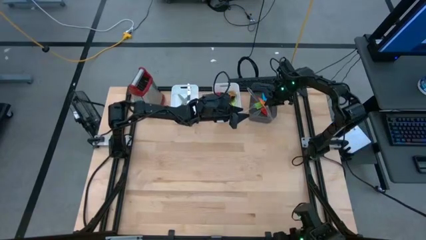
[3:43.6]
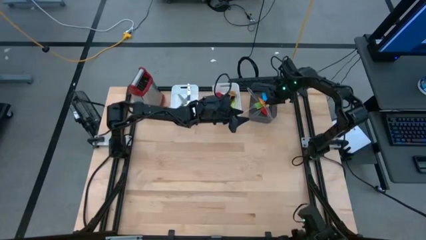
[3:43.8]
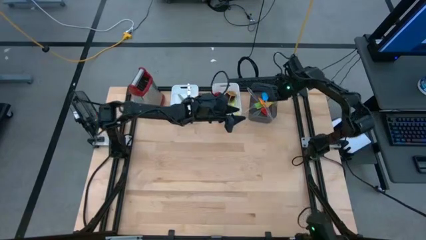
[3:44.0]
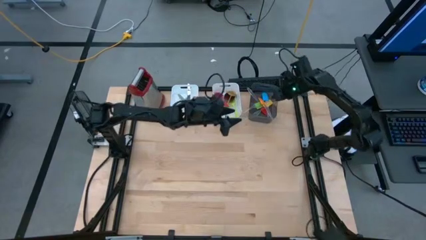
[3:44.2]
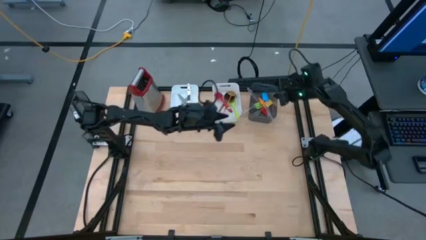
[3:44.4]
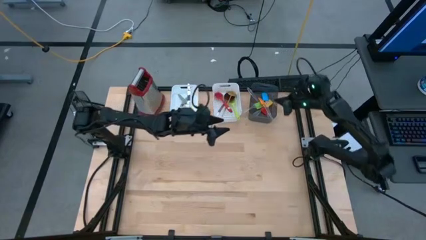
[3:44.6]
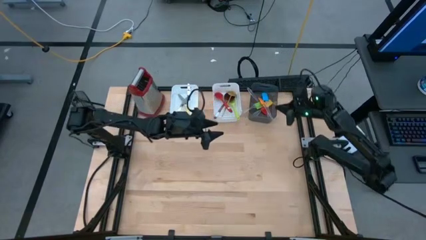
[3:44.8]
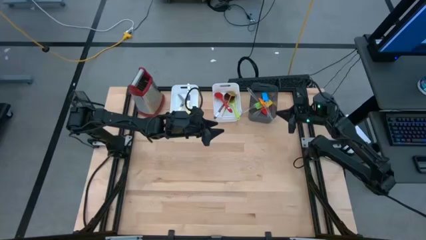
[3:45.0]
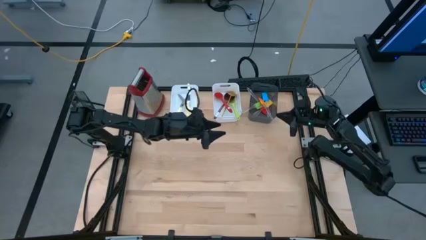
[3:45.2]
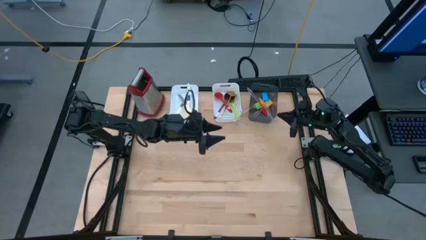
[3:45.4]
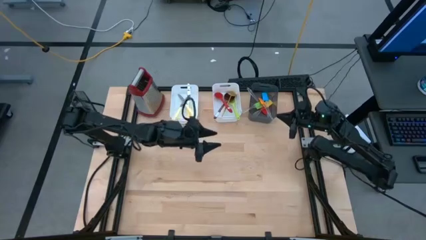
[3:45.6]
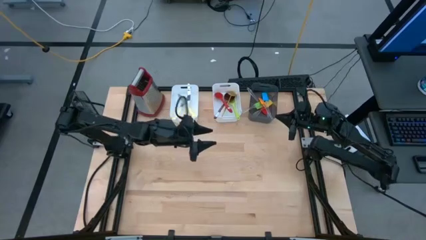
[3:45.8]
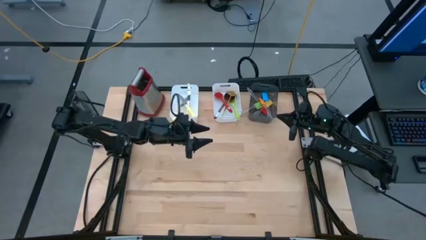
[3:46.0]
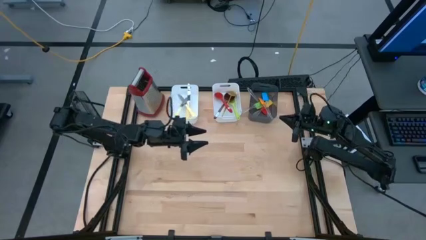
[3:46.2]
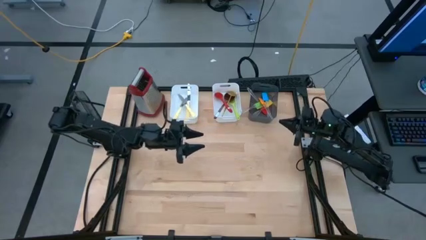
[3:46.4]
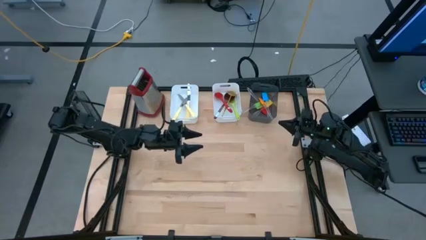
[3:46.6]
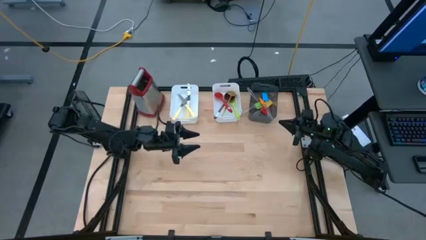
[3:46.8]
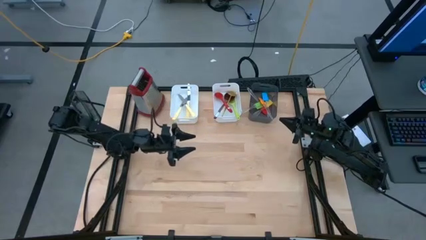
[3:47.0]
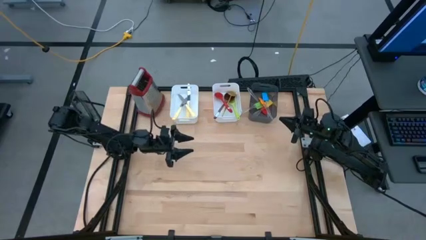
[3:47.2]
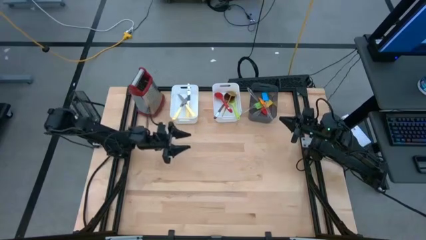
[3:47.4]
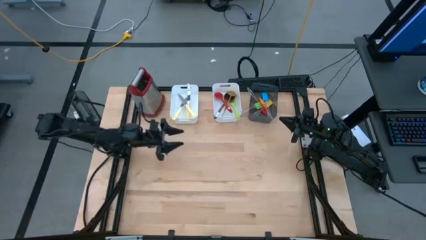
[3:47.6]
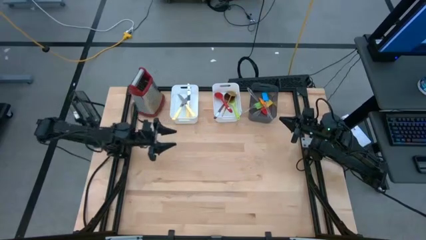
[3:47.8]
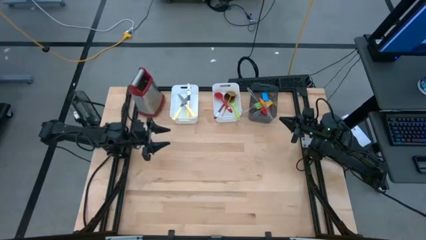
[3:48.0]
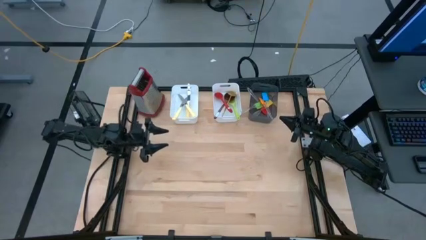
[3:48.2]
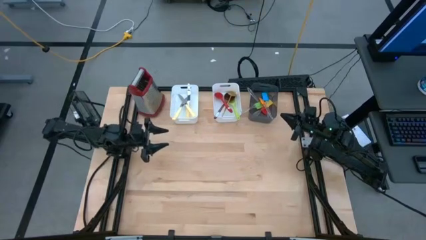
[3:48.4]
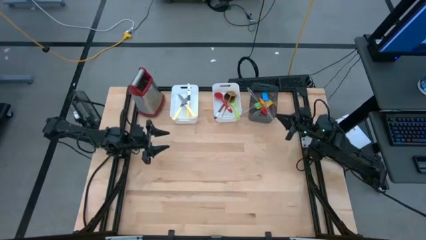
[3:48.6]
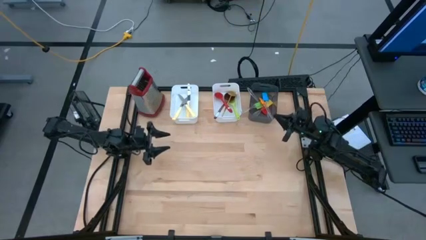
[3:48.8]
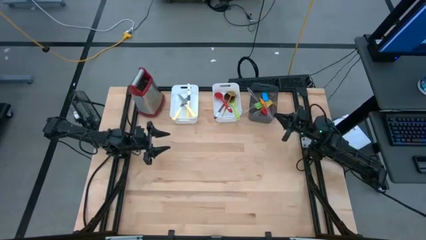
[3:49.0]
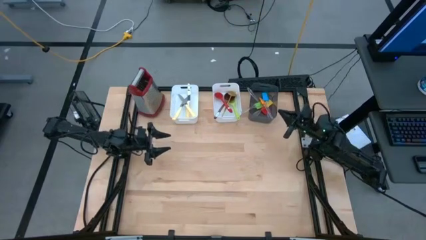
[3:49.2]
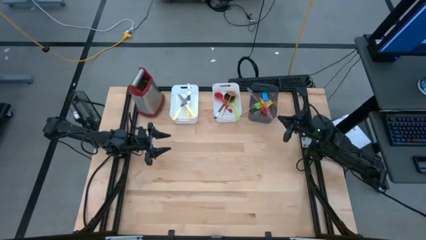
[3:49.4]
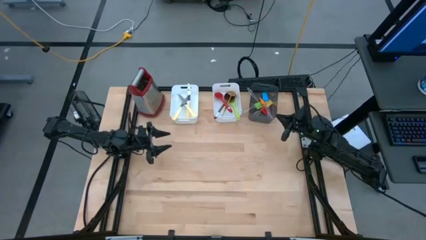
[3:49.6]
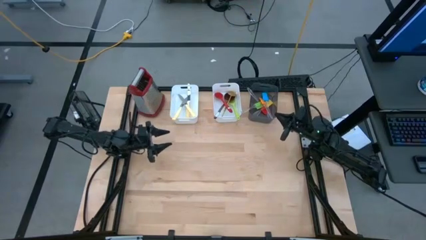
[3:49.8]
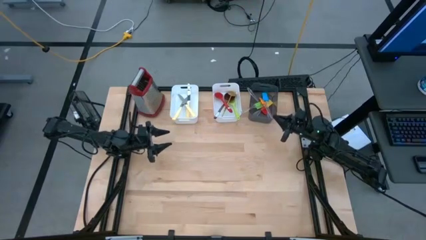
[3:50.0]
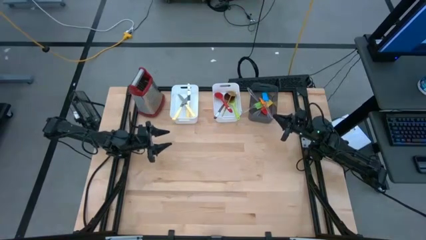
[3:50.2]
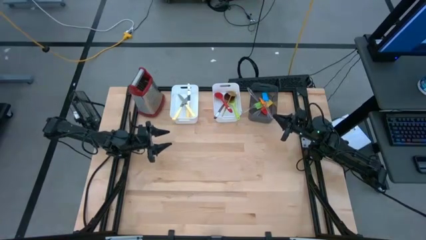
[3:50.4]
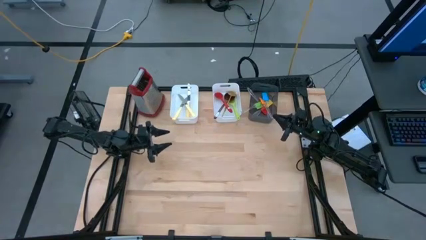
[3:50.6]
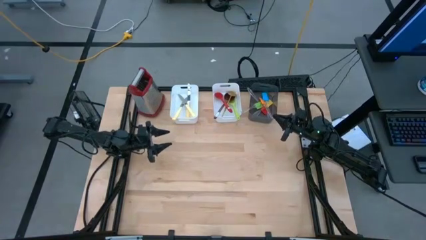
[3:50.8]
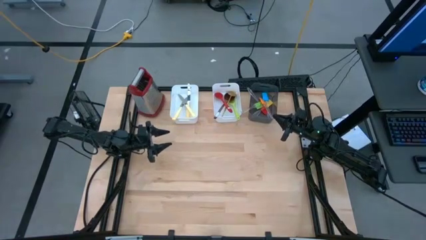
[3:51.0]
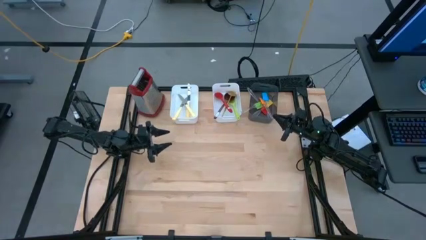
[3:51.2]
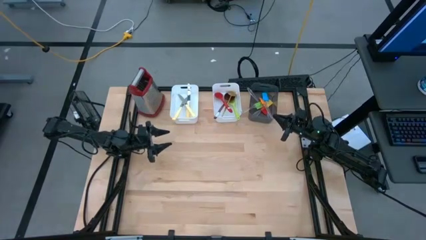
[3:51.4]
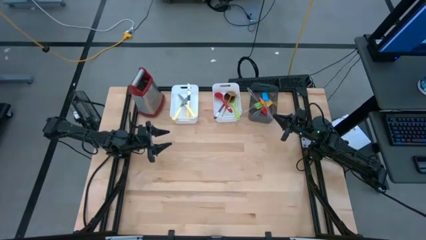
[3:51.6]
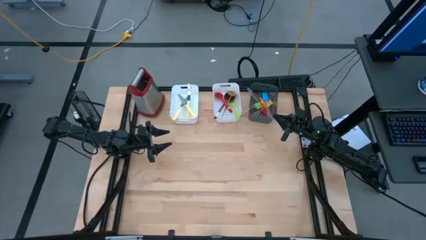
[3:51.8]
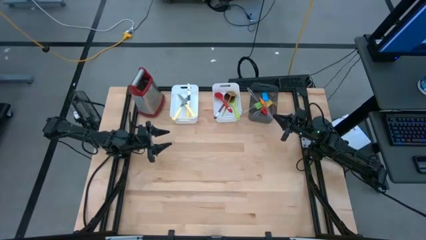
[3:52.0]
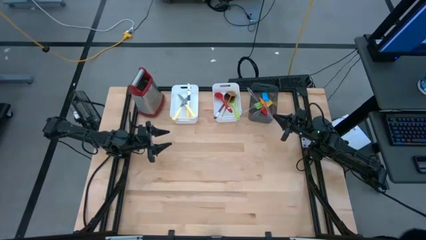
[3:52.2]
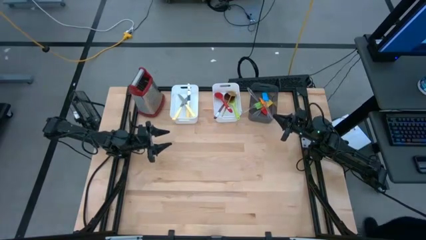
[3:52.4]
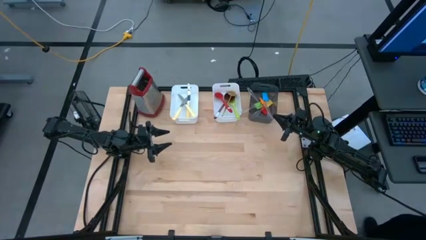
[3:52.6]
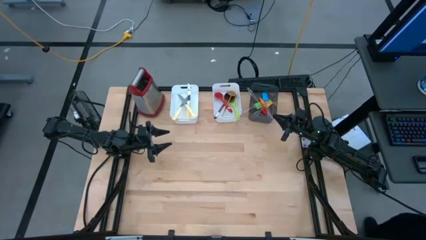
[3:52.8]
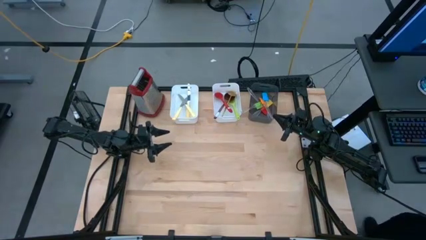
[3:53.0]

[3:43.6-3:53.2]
Task: Pick & Place Kitchen Items
Return to Home Position

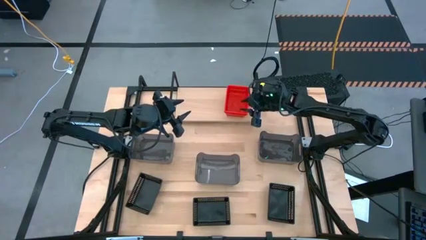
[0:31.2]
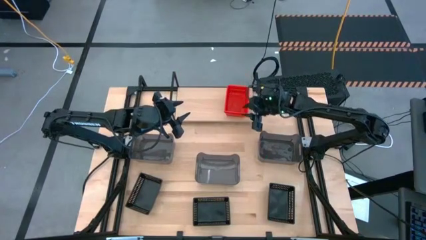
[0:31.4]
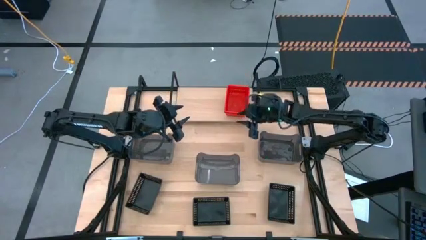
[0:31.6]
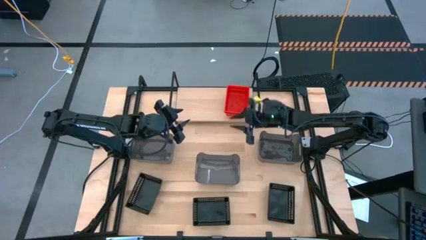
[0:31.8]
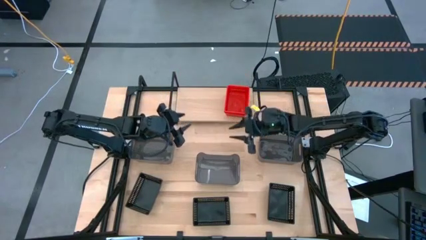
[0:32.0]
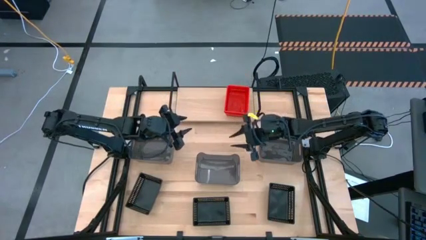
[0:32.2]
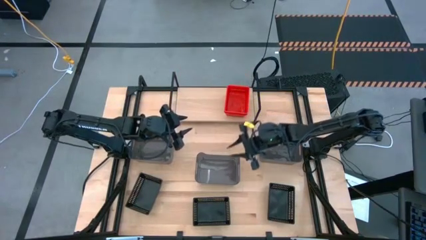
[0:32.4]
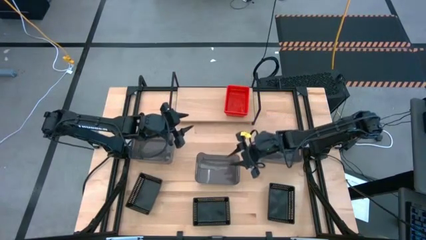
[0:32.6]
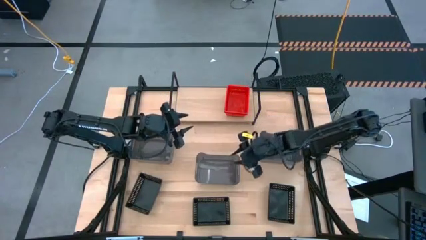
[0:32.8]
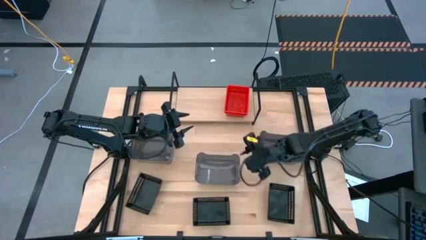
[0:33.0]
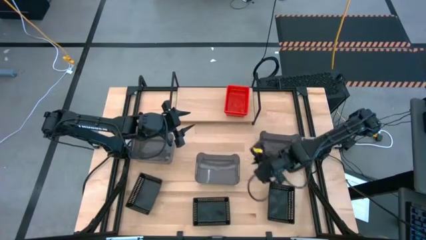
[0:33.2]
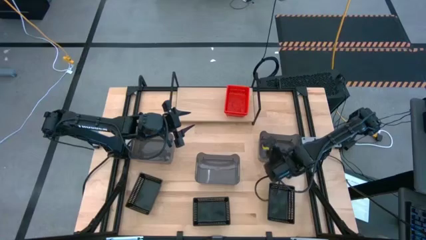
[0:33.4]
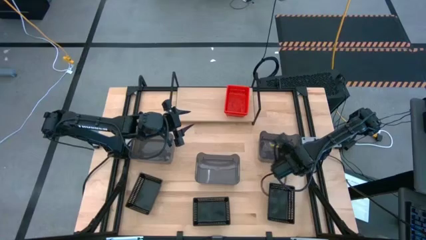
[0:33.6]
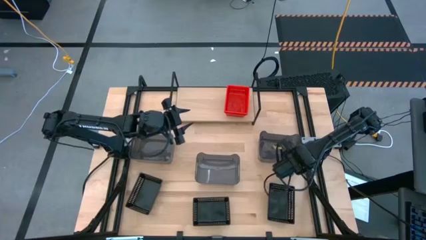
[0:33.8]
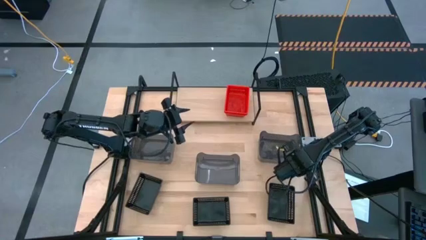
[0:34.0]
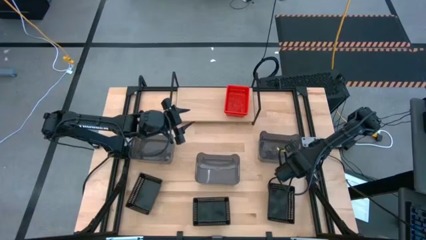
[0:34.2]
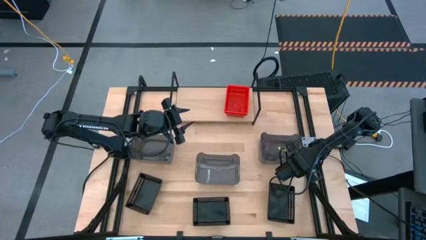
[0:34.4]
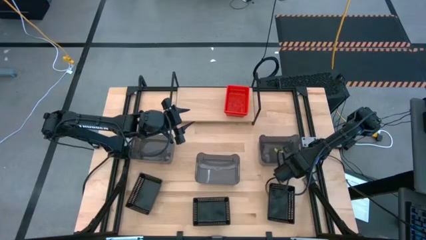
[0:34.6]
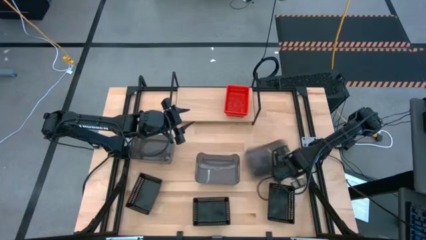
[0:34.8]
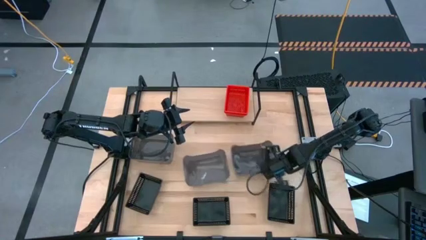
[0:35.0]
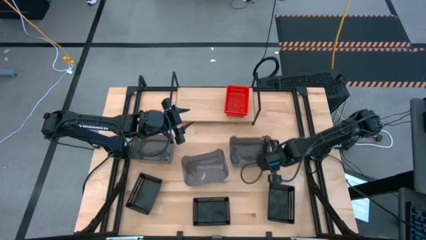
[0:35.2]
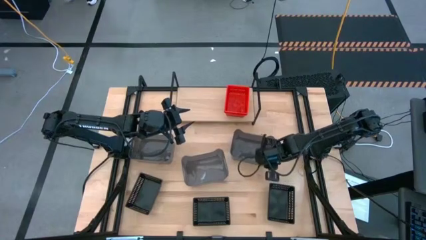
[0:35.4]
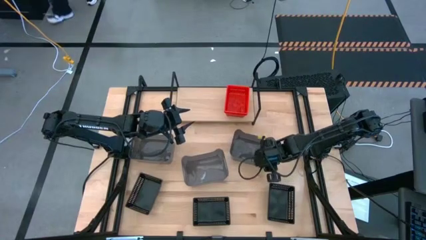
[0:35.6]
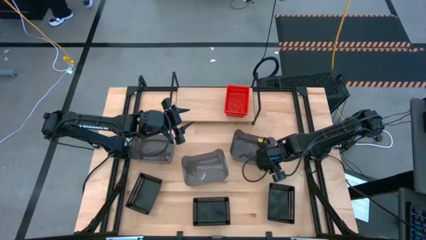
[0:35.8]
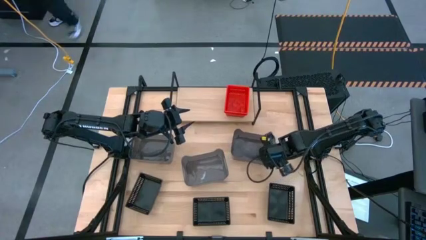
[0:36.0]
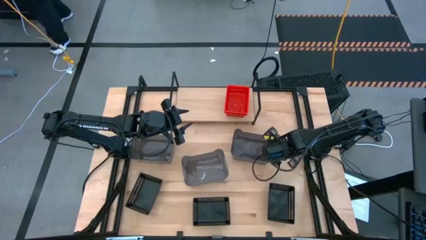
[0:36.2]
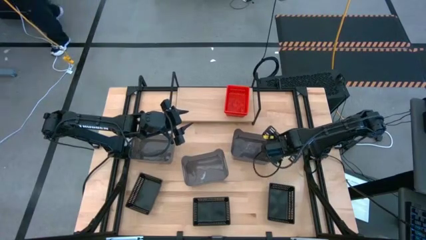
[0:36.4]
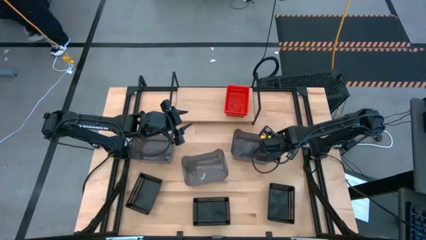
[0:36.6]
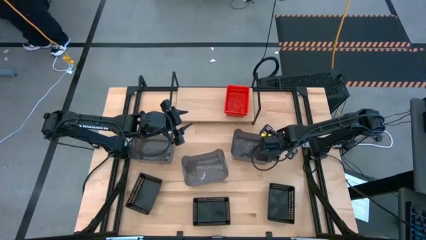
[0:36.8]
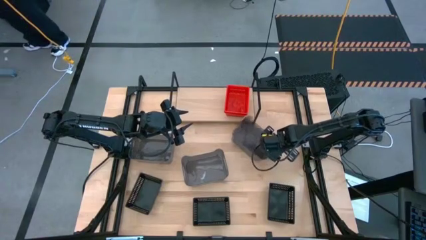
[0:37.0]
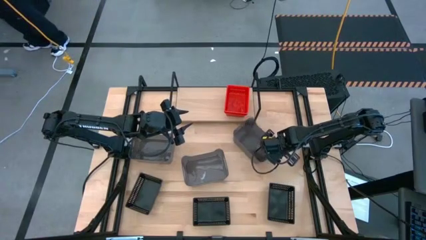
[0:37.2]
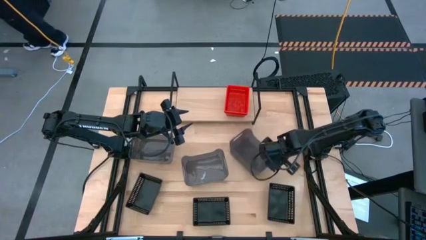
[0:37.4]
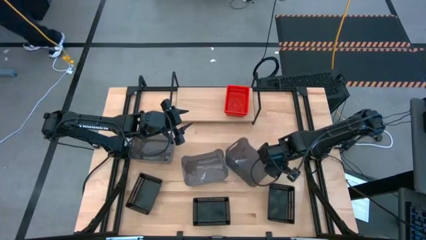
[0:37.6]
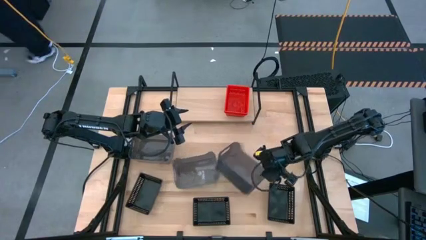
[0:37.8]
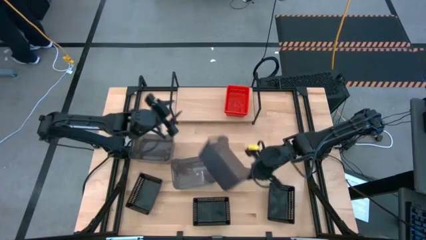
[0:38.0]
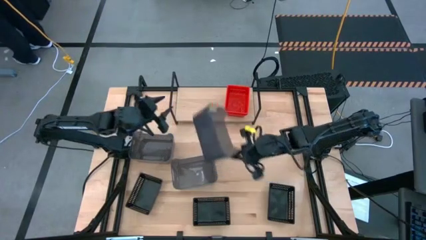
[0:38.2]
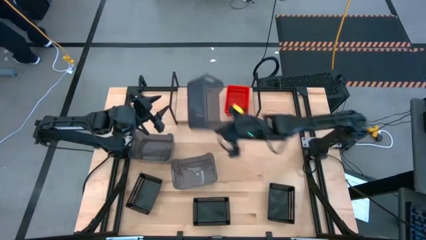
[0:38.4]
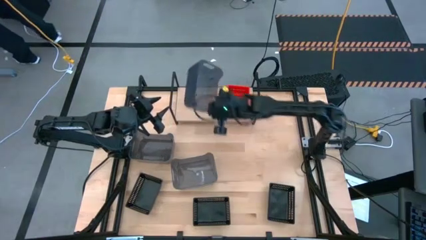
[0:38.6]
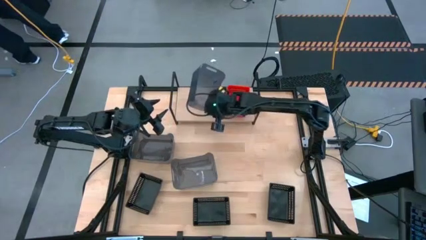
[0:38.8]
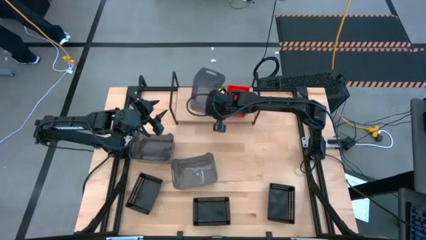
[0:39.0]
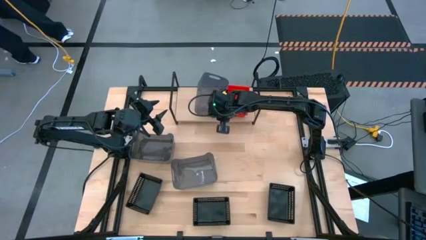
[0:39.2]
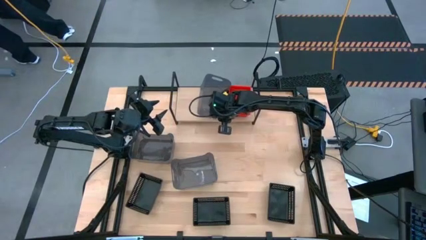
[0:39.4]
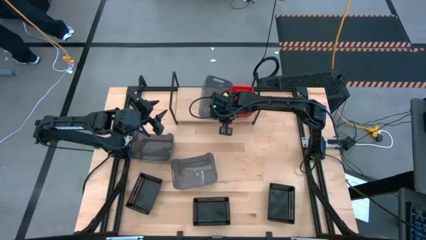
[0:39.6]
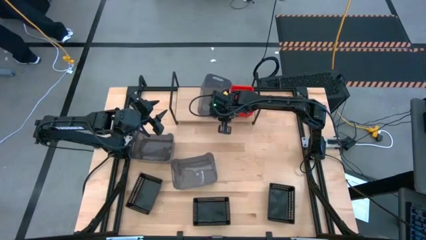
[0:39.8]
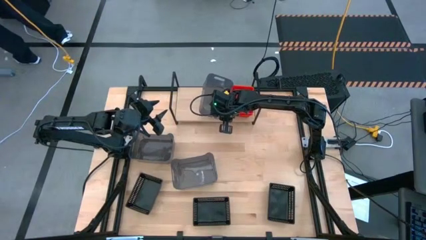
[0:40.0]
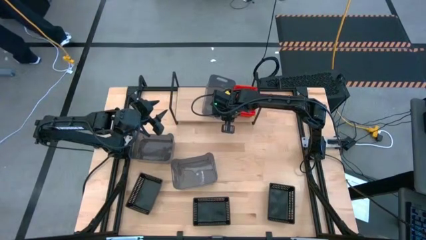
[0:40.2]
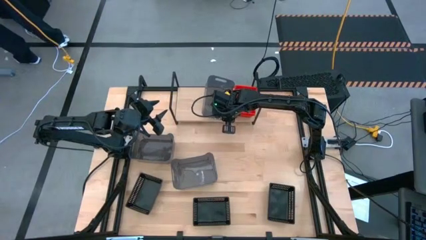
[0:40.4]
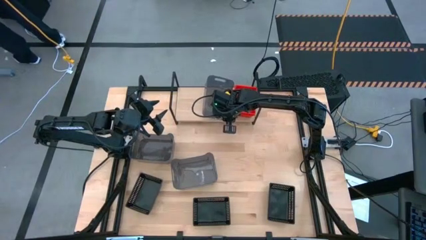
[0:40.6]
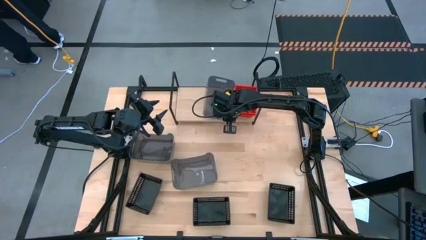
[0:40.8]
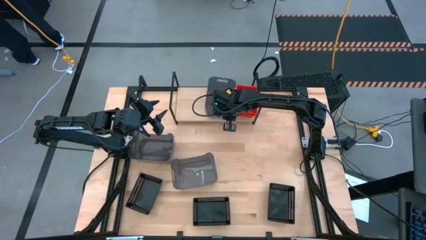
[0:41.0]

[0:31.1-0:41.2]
Task: Stack baskets on shelf by color
Put the right light black bin on the shelf
